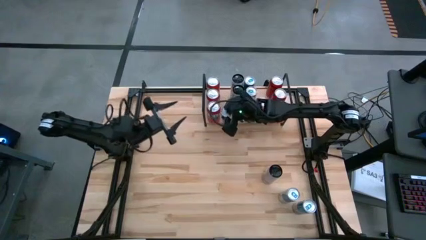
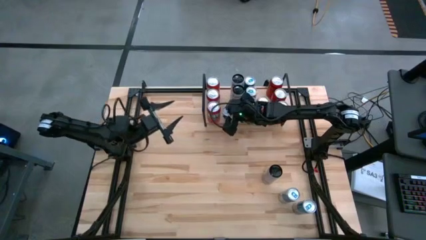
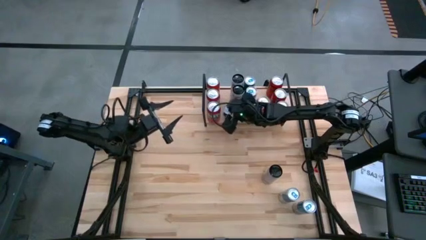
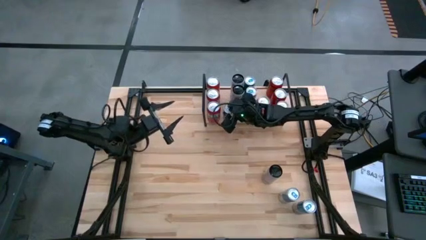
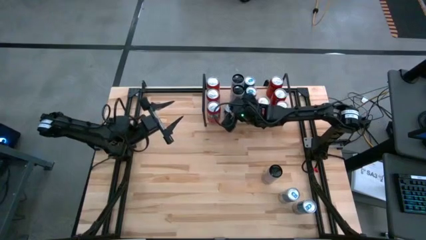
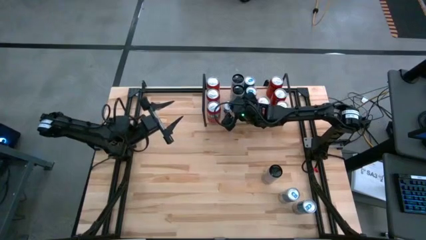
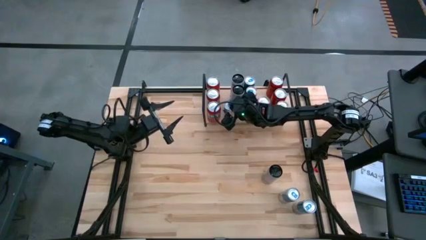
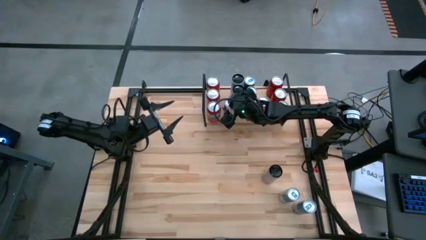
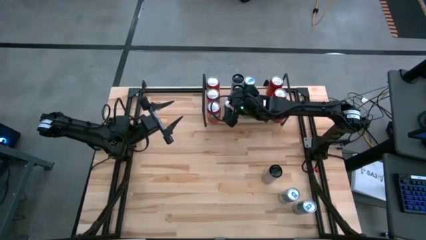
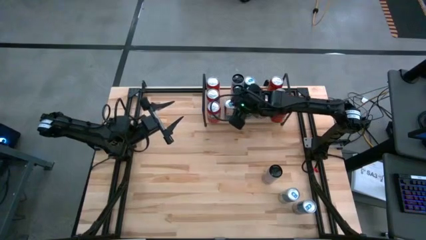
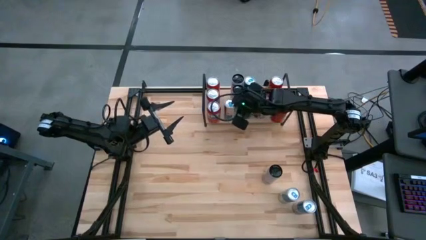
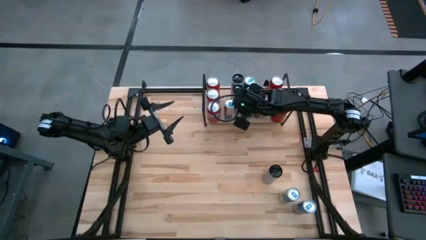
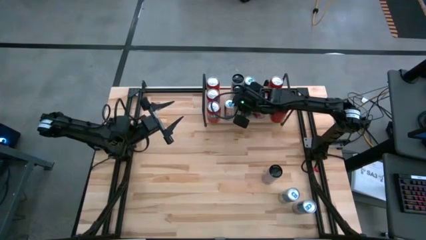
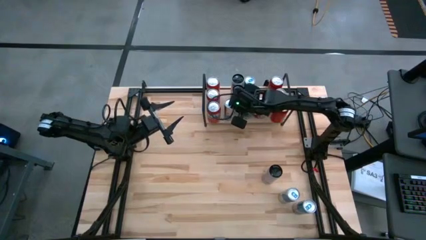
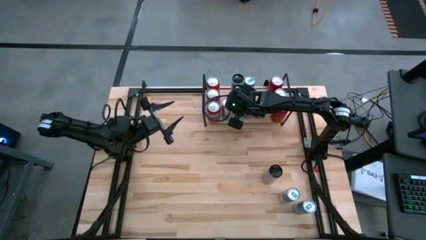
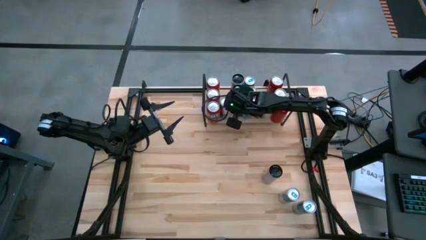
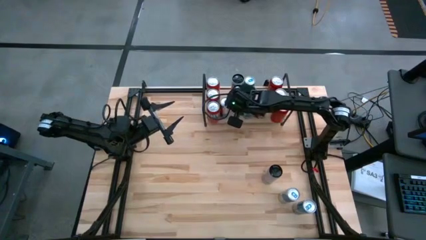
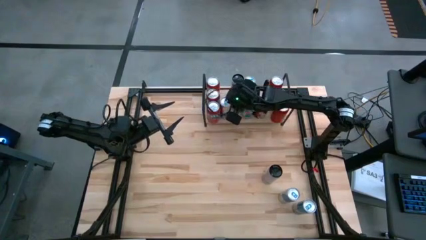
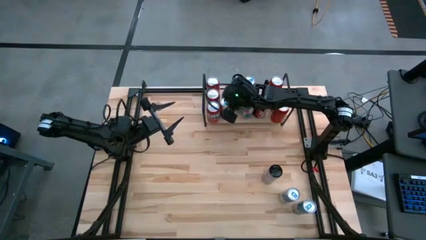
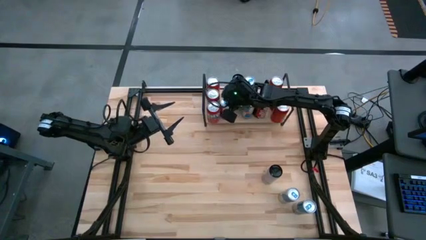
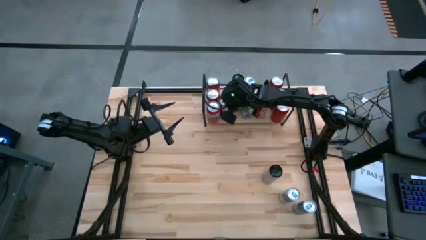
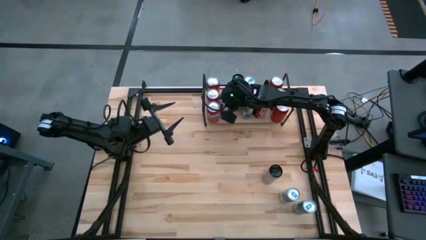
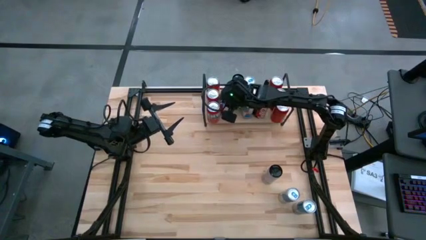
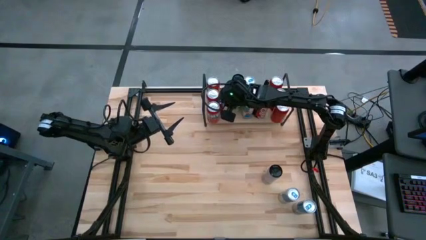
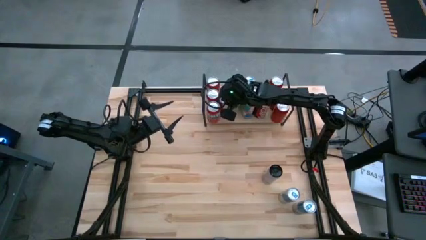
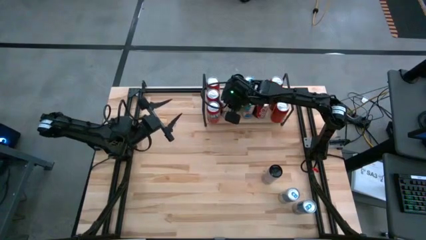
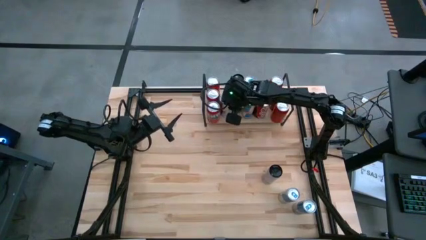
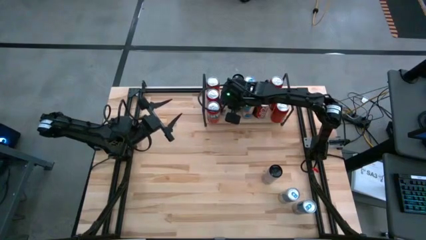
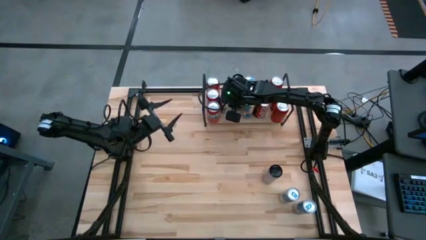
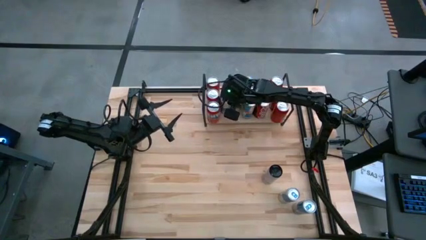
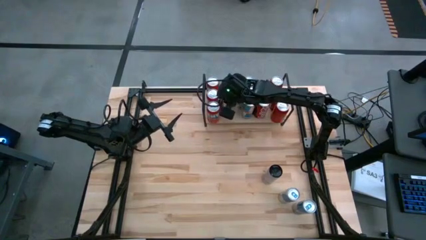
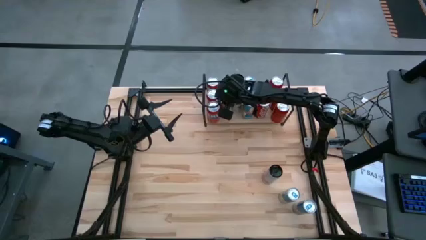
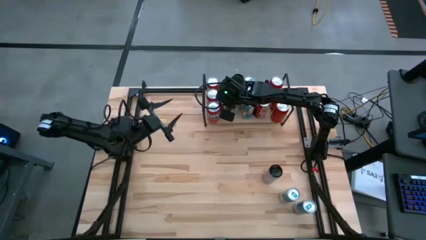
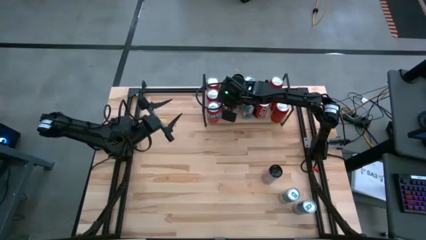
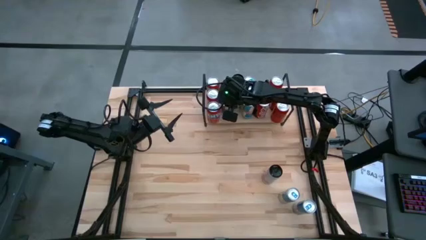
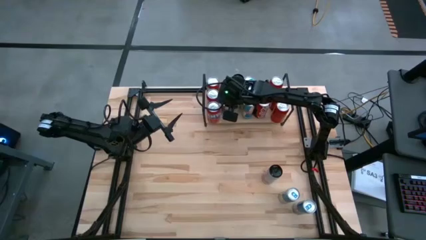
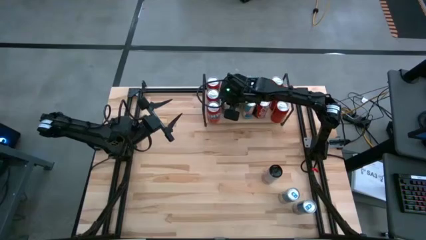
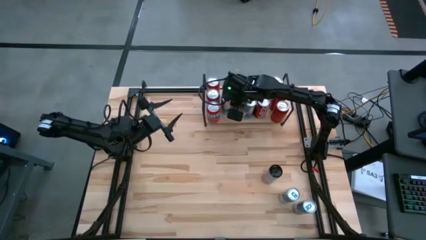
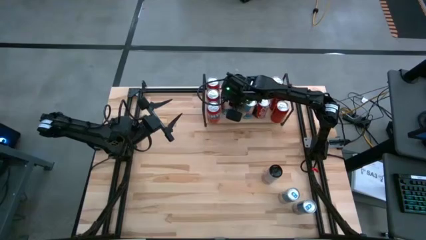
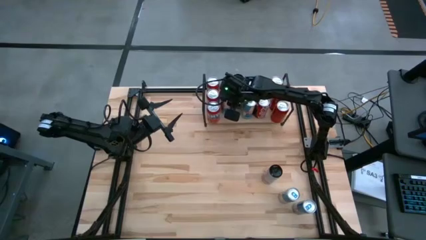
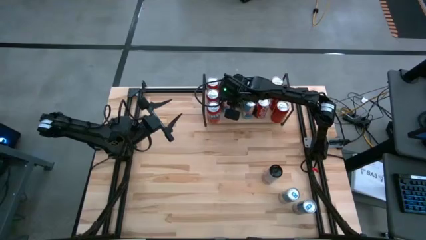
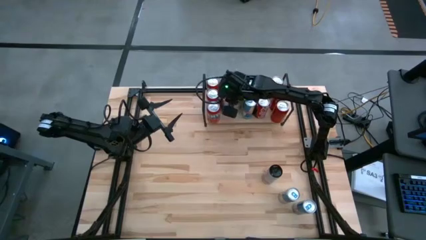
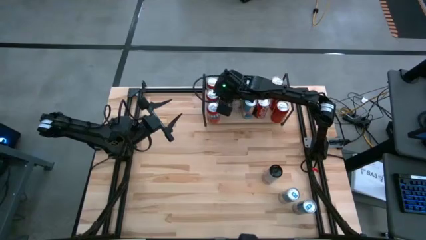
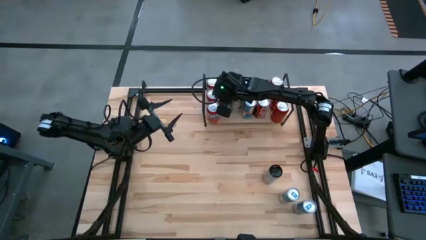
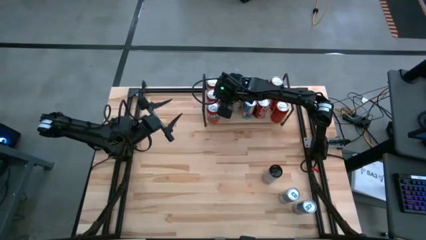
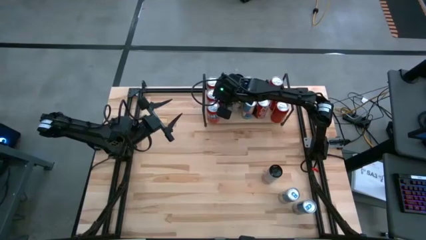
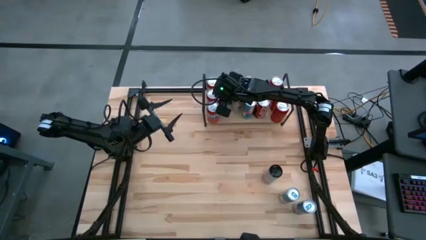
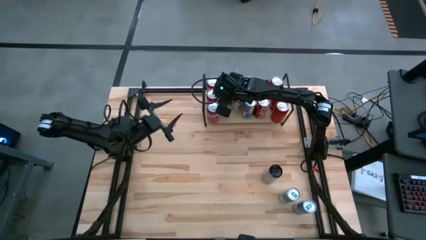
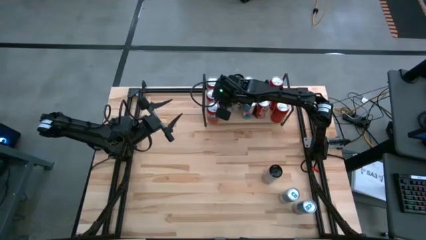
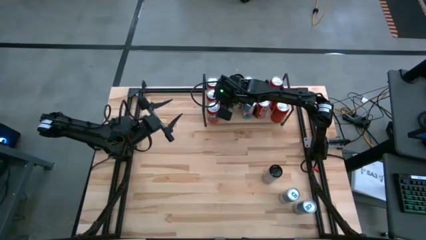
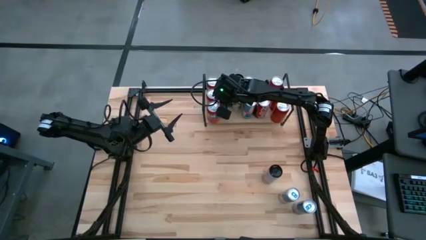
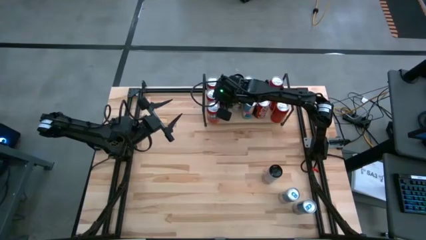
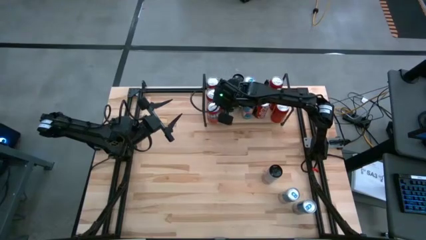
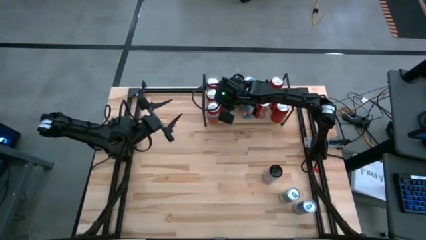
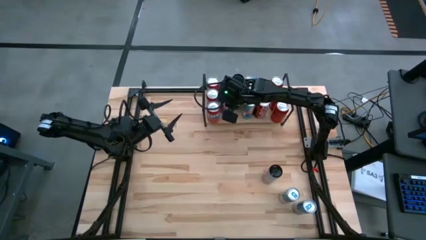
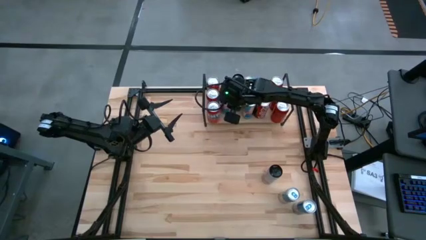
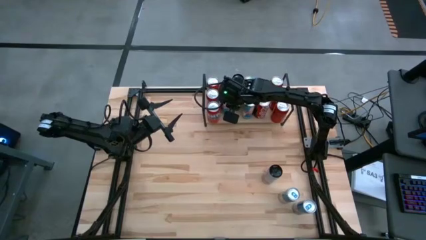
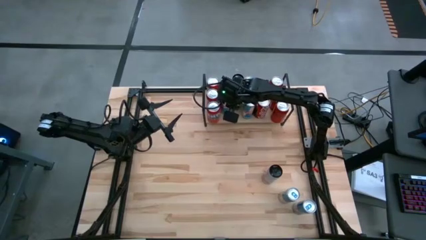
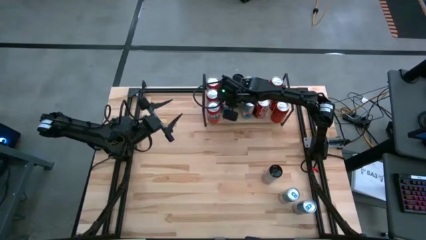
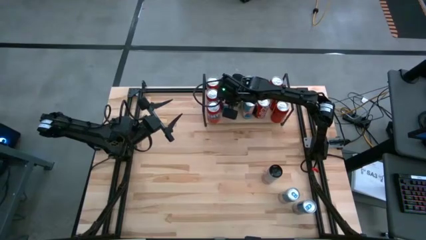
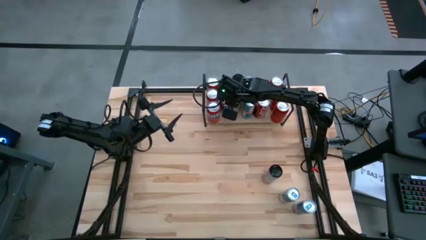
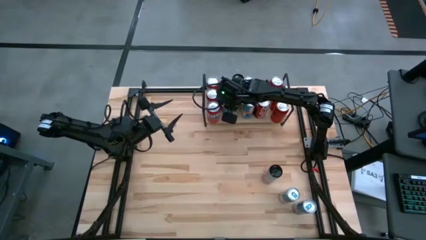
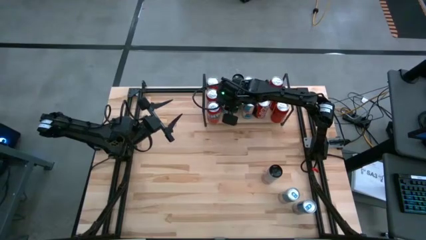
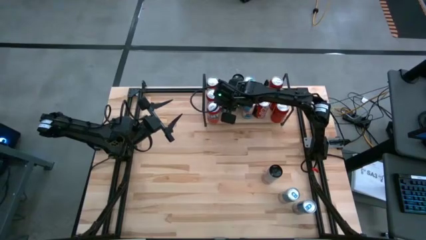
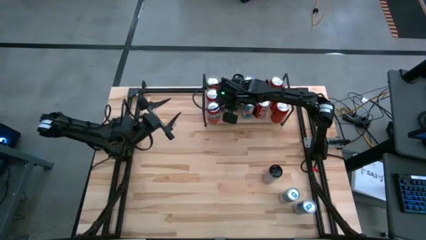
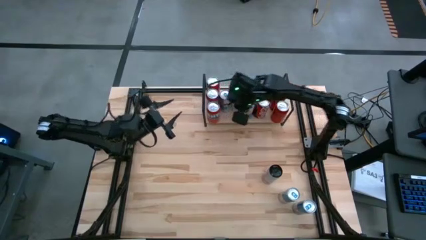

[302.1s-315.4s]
Task: Place canned beverage on shelf
Put the blue soda can on the shelf
